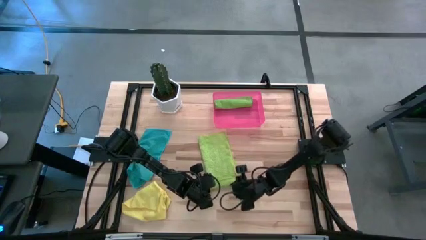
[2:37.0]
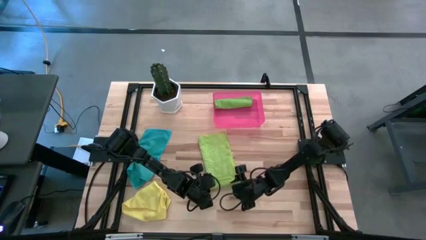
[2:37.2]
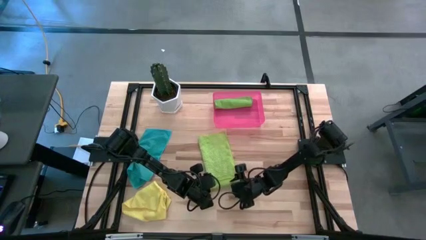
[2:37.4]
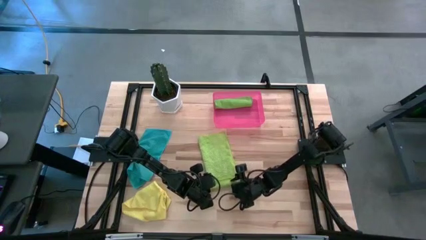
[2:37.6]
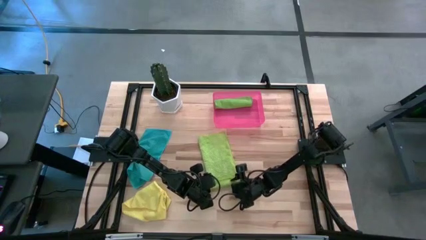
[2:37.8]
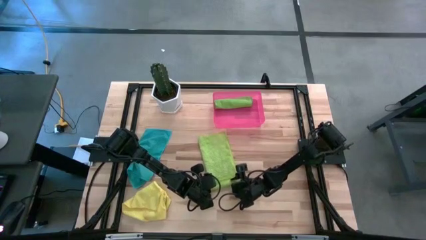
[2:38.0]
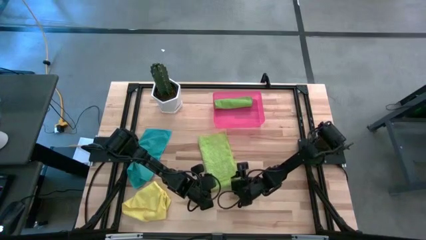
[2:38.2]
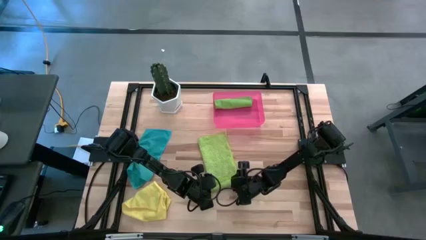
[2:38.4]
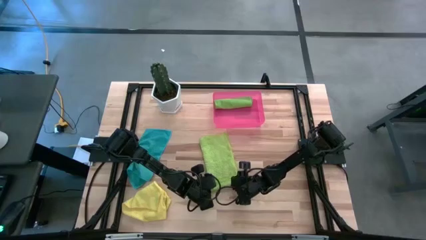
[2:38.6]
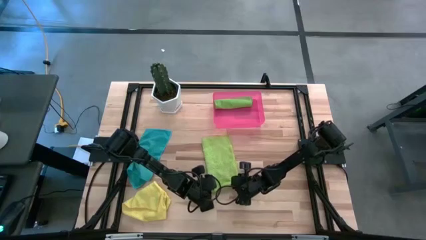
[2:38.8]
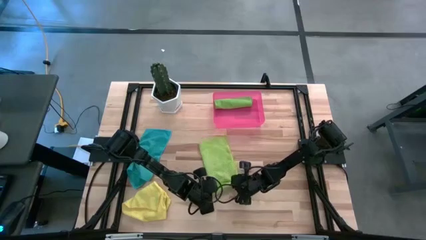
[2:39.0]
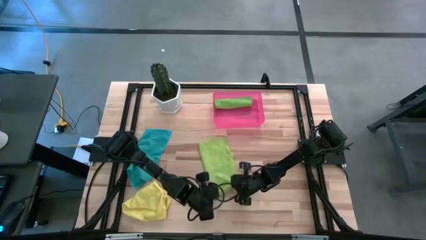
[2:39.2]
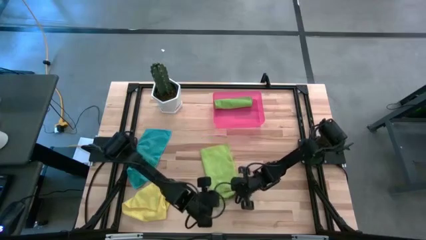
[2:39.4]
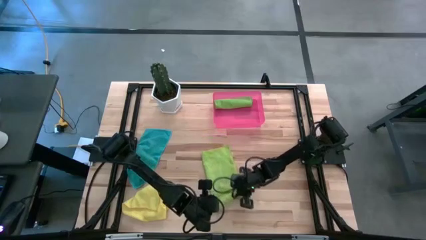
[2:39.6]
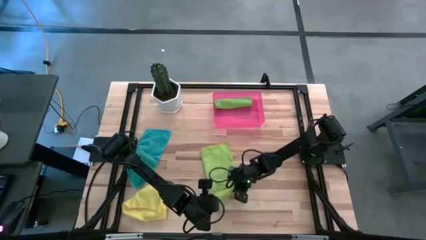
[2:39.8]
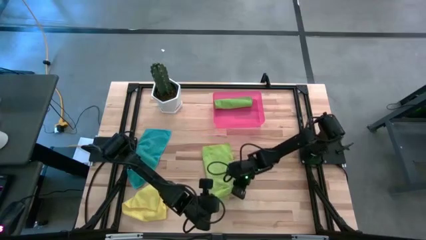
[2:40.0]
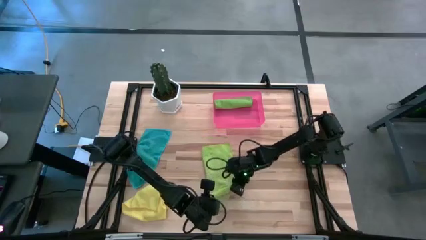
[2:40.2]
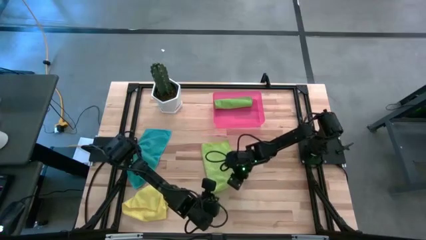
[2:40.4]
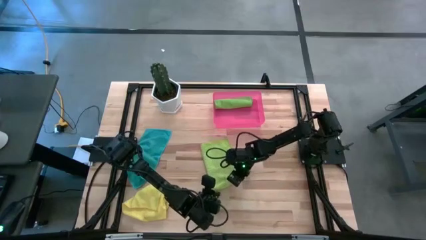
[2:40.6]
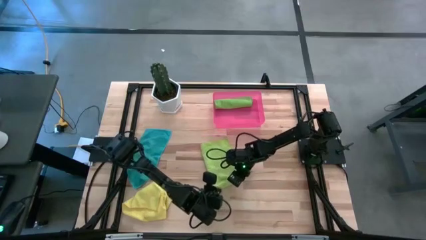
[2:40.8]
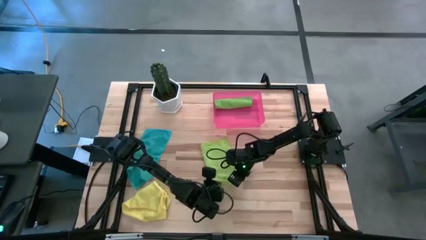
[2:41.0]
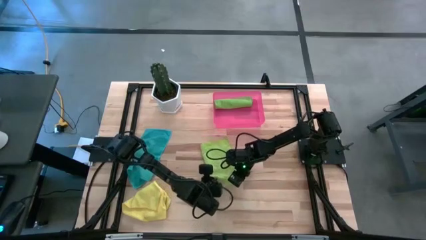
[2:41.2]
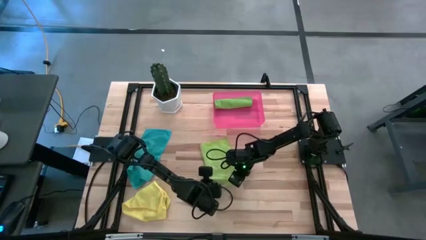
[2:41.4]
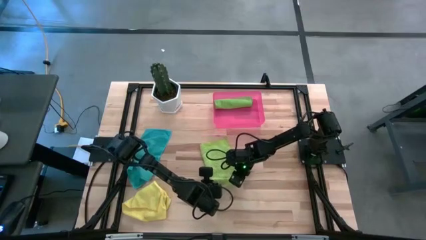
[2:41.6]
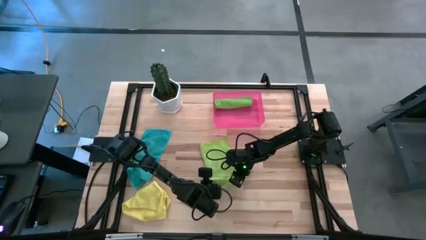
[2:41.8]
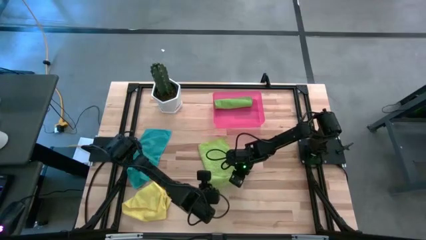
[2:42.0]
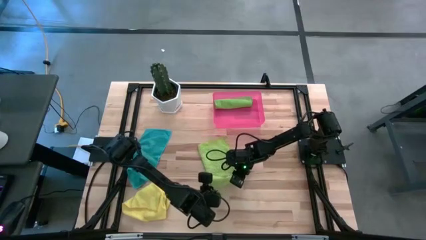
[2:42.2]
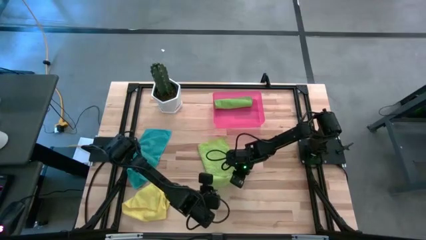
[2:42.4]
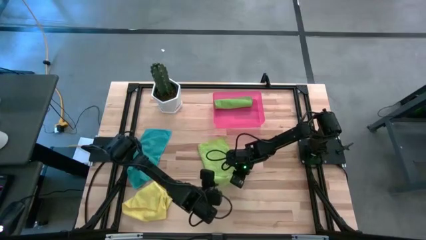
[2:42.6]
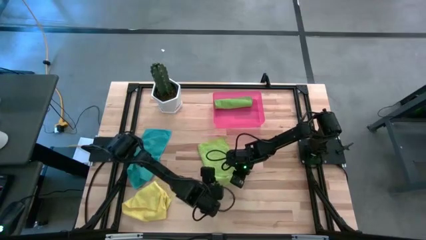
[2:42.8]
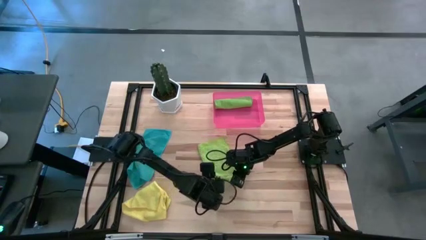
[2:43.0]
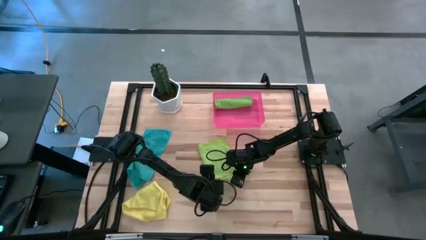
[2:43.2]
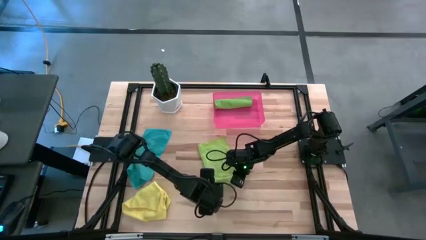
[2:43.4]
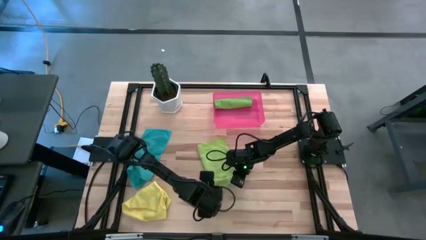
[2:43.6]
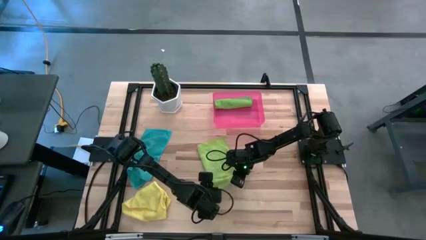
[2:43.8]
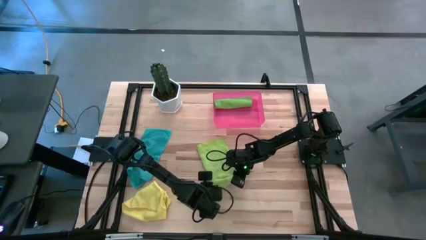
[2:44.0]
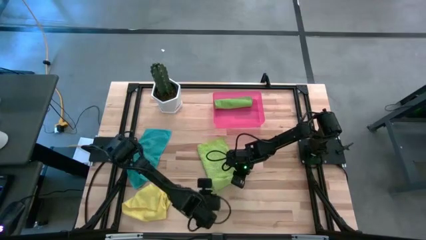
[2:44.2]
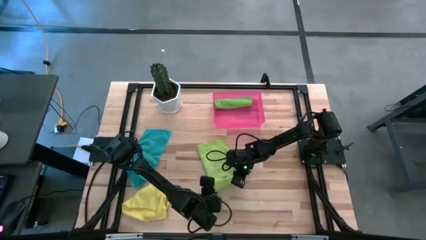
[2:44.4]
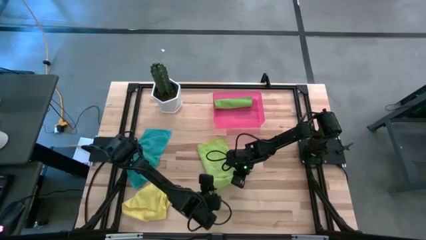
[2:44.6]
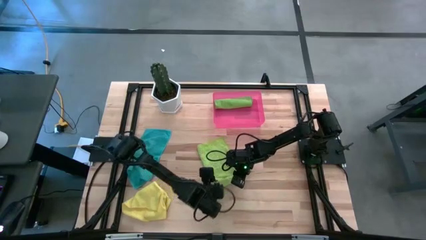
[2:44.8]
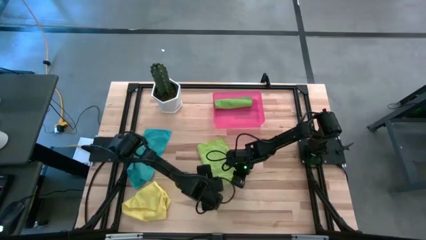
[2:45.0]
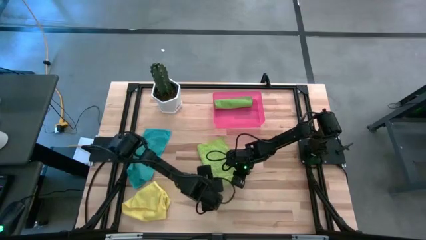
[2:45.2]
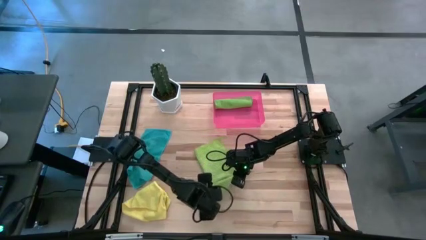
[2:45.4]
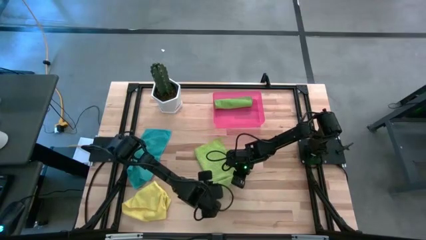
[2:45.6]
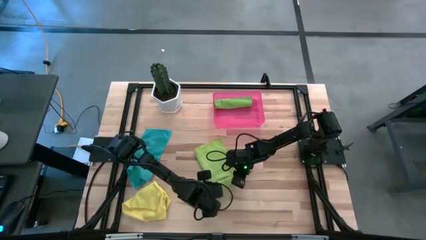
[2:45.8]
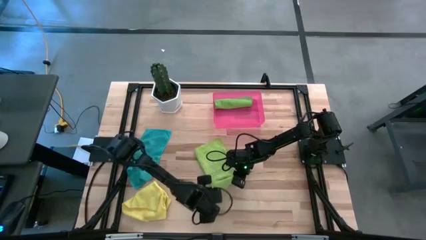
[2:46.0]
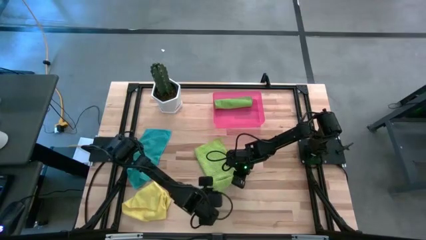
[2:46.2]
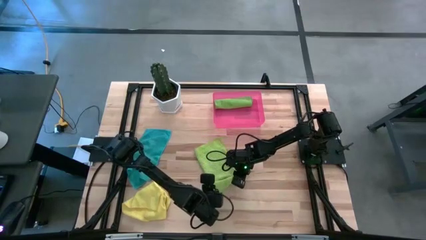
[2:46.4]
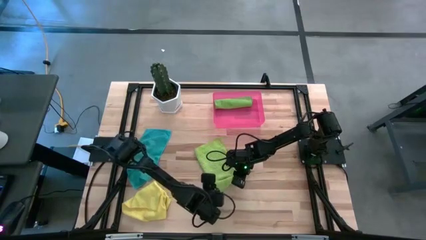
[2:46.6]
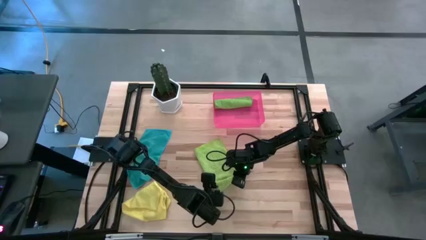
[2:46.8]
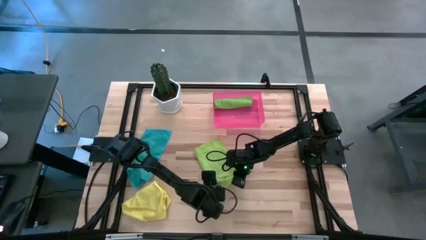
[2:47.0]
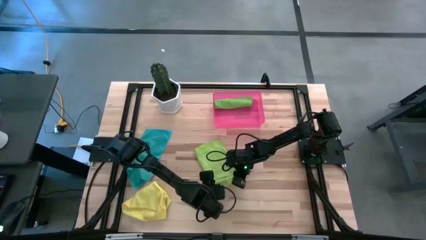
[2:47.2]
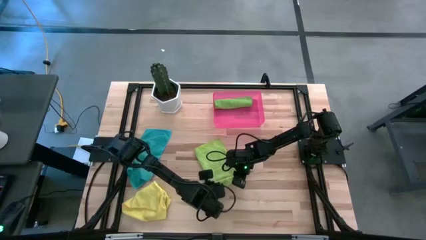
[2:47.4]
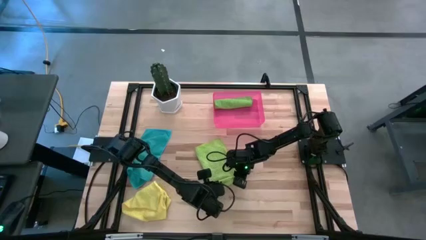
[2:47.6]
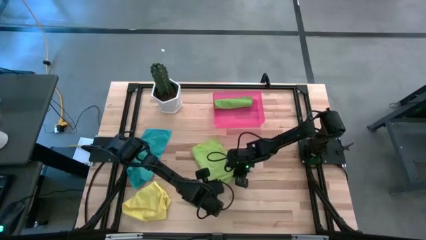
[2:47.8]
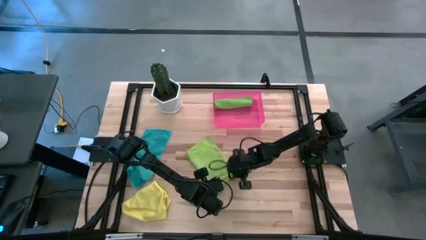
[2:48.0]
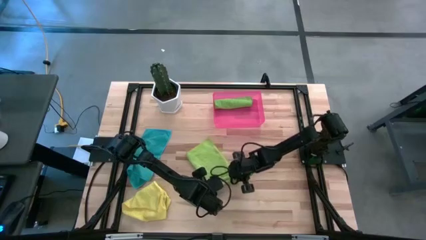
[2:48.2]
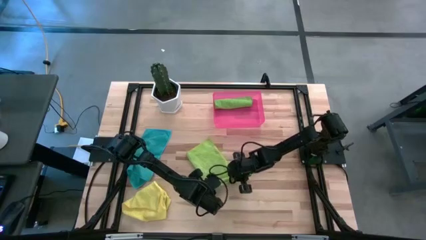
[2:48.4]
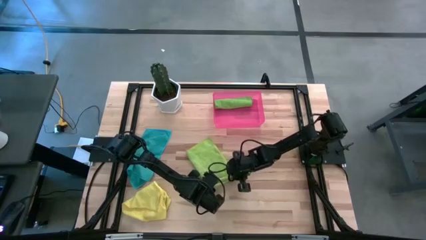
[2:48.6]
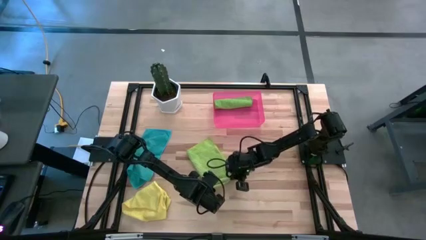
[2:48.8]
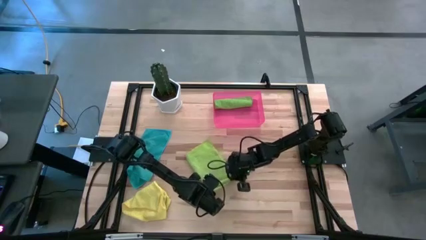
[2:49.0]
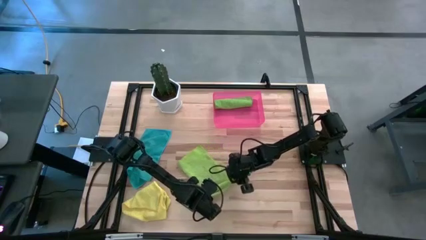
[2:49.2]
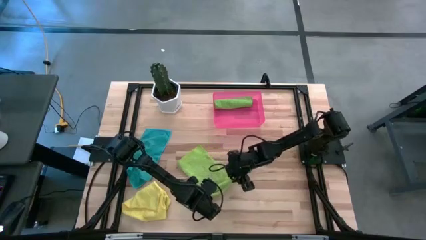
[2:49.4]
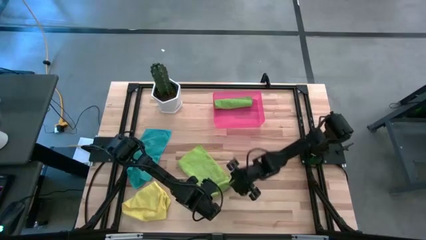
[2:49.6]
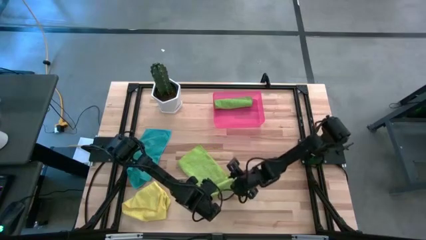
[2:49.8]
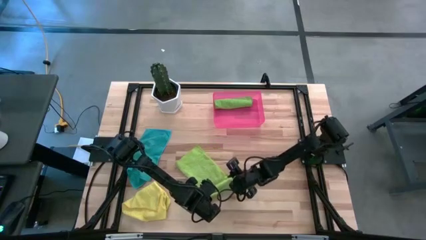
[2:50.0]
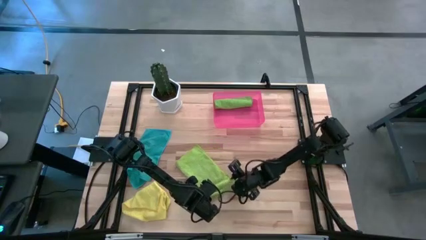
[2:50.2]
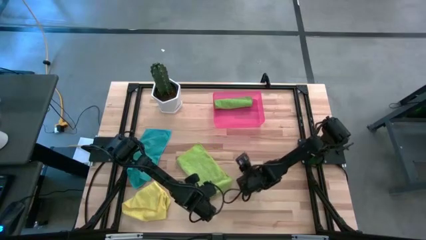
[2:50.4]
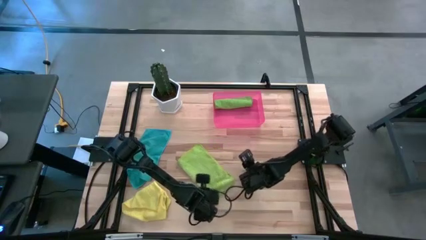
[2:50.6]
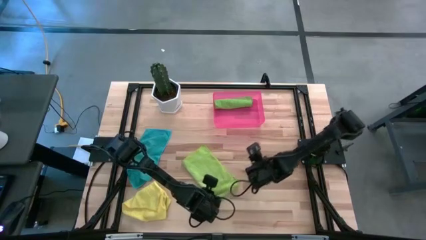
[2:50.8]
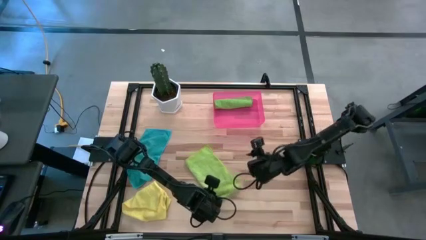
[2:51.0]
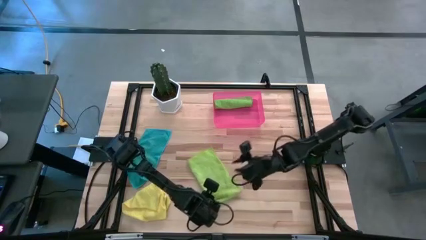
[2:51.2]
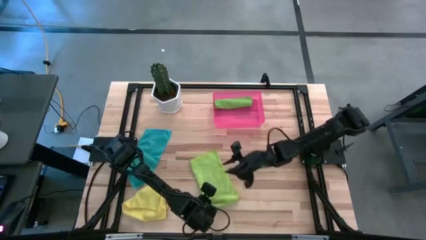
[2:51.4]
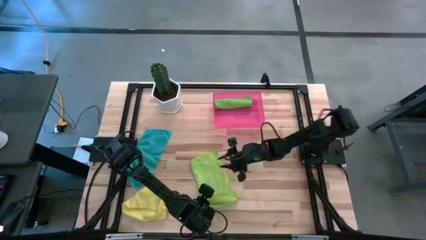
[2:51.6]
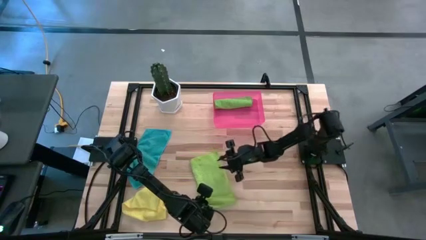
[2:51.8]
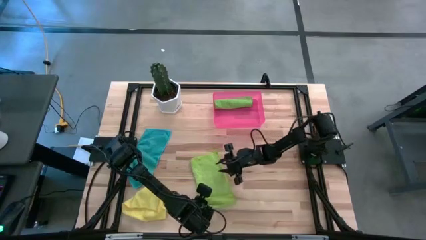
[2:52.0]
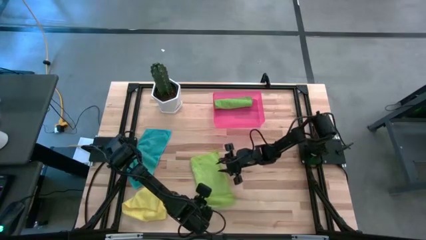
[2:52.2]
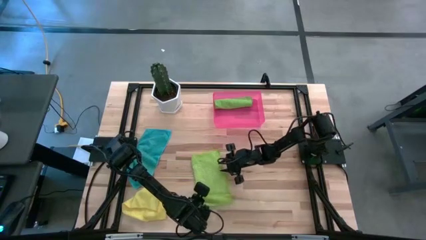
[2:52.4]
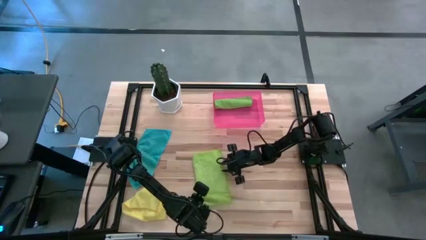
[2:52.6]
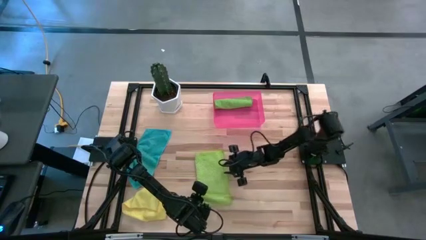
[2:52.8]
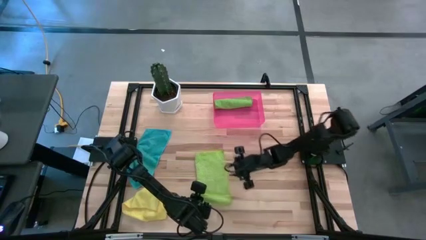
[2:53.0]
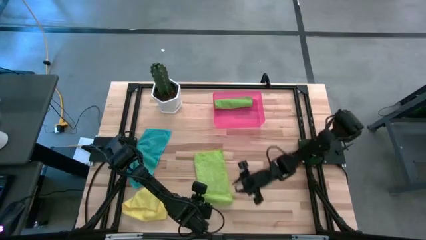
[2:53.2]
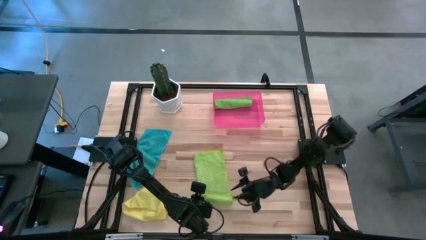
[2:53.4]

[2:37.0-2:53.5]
Task: Roll microfiber towels into tight, uniform cylinder then place into a basket
Roll the light green microfiber cloth
